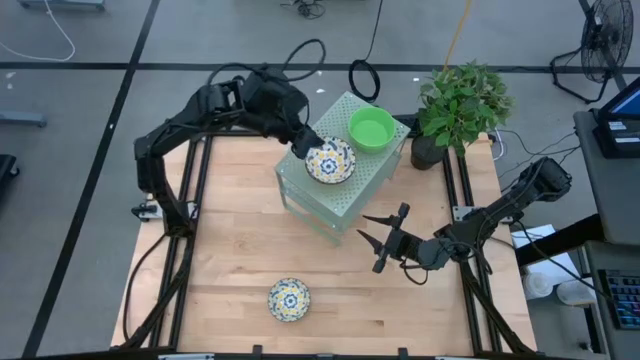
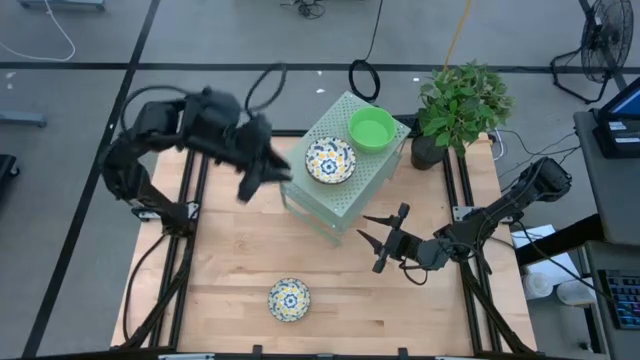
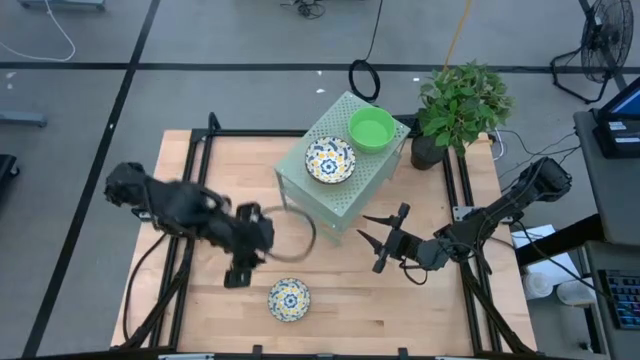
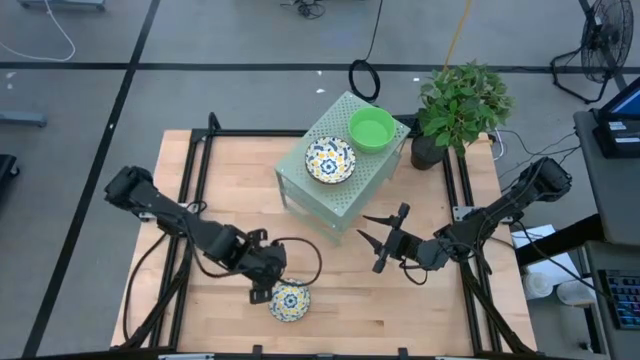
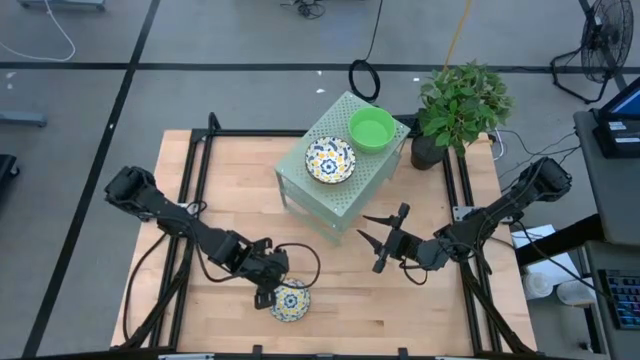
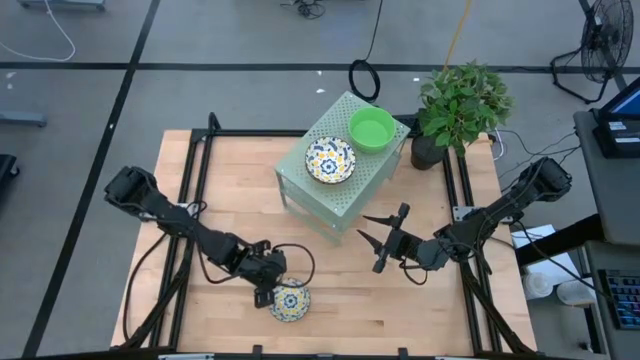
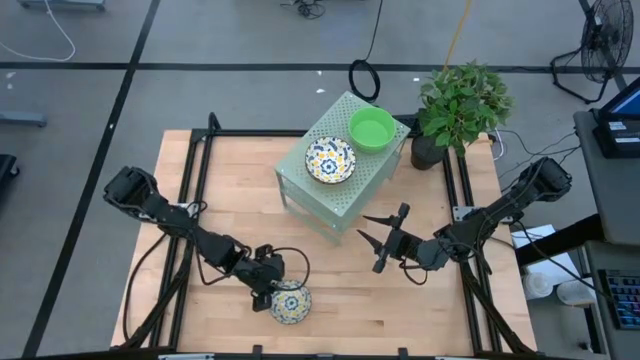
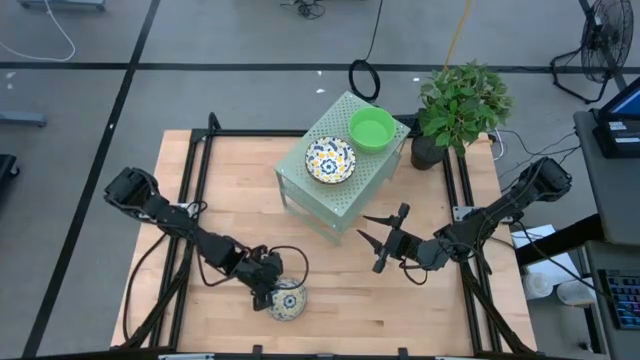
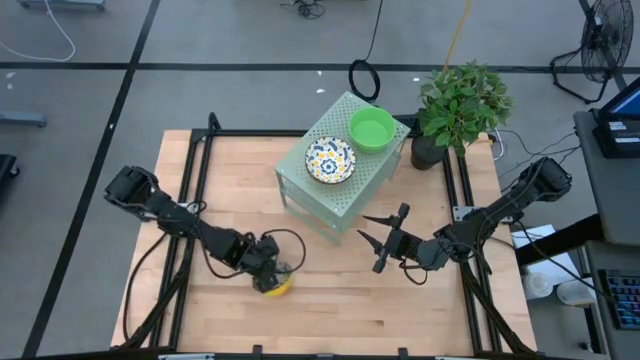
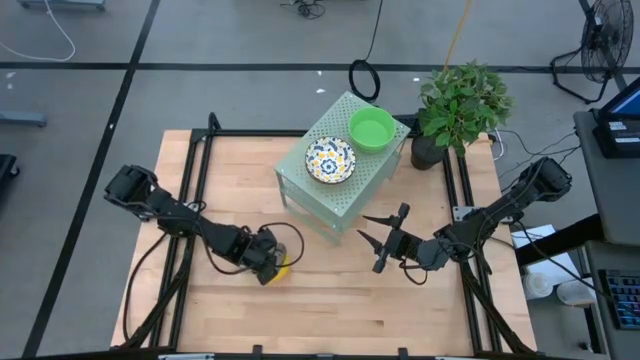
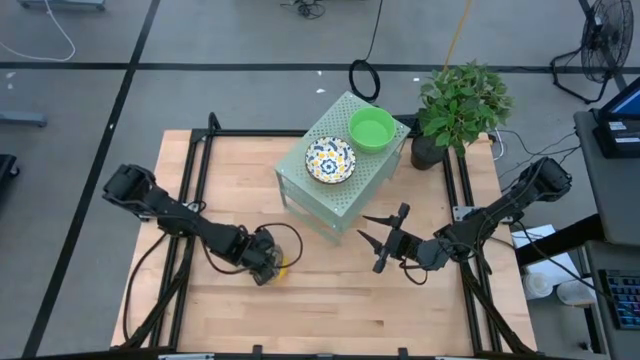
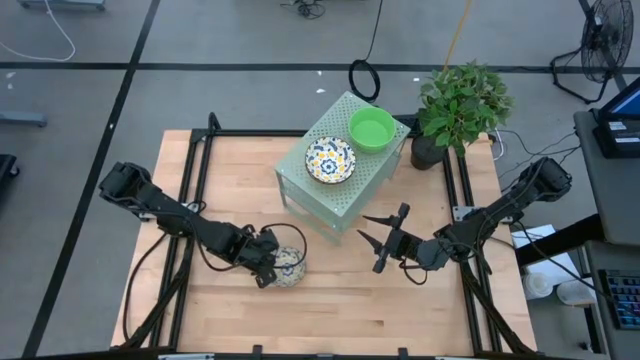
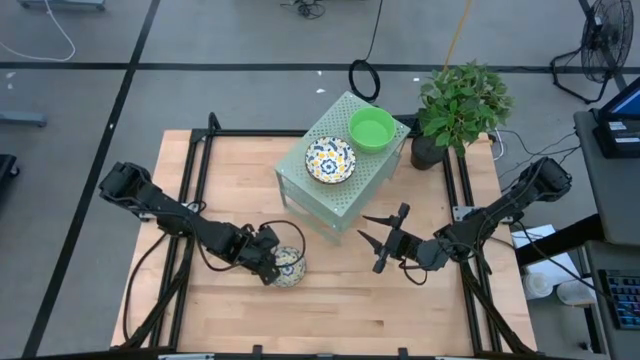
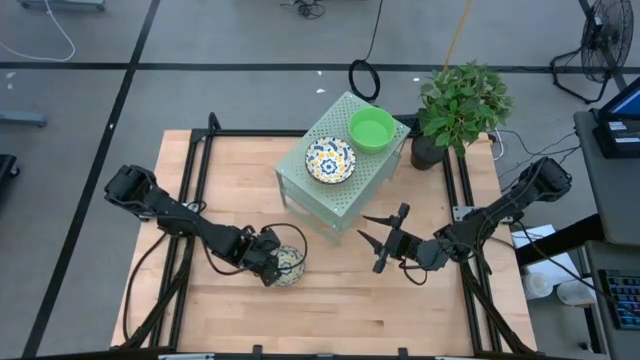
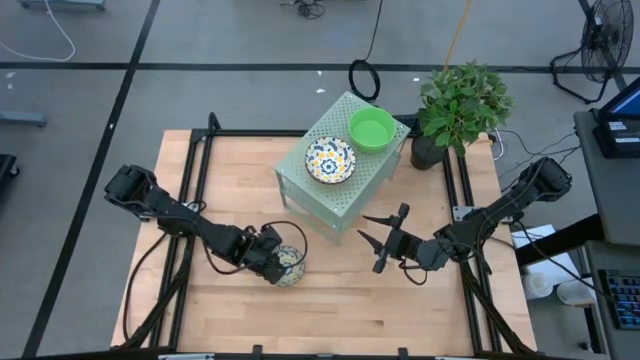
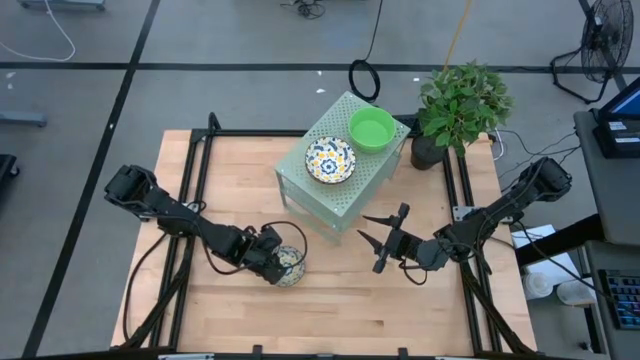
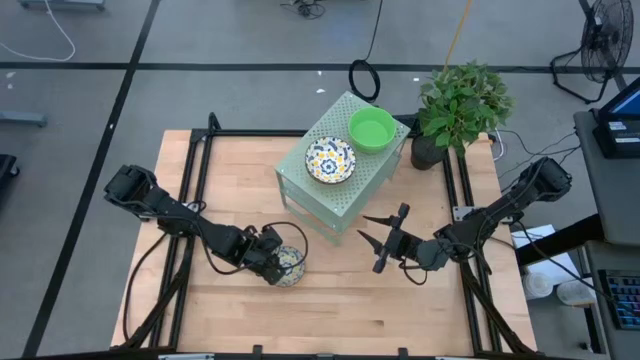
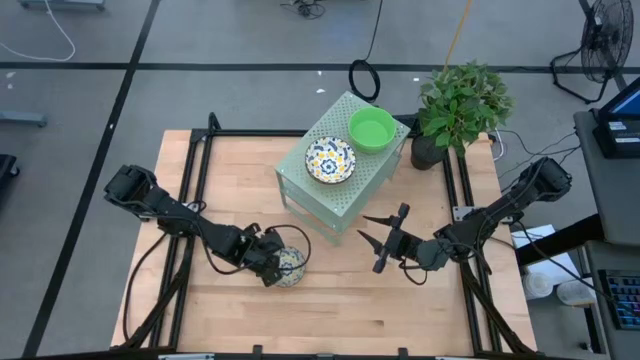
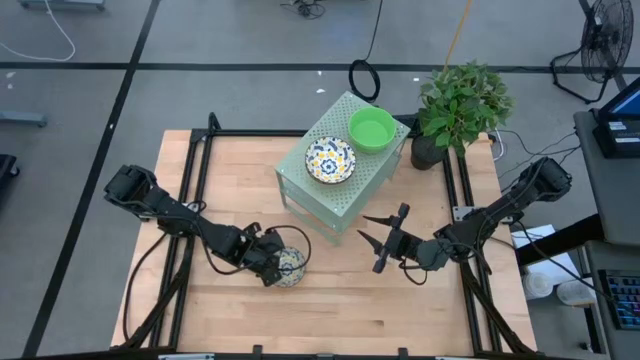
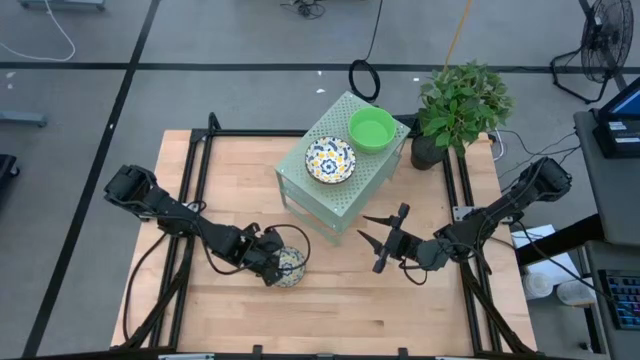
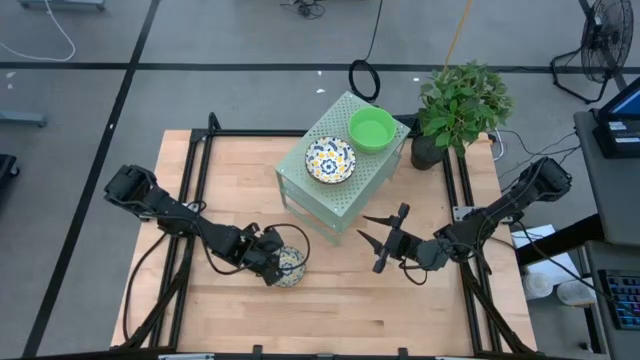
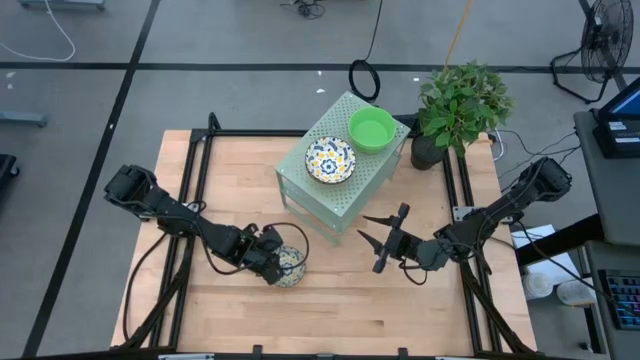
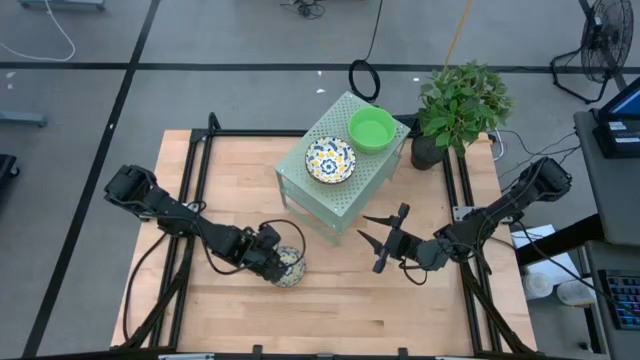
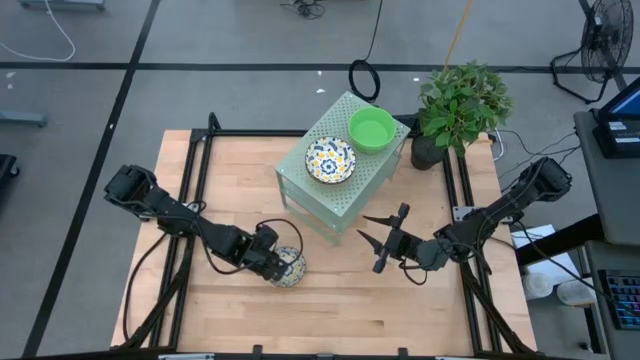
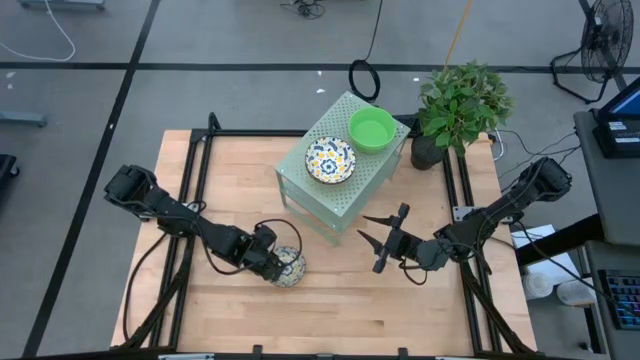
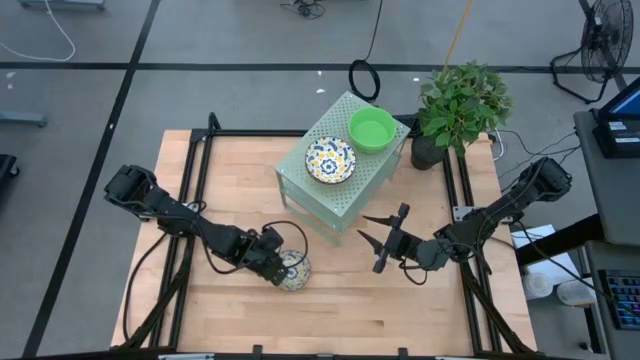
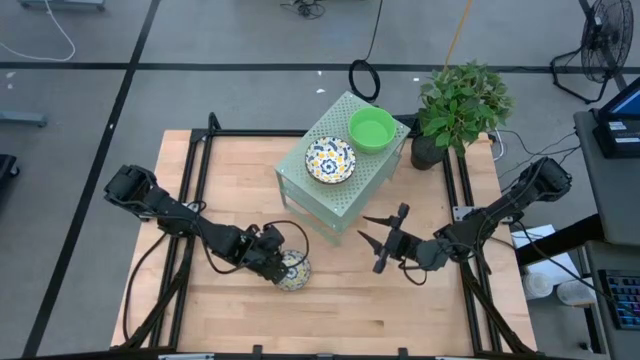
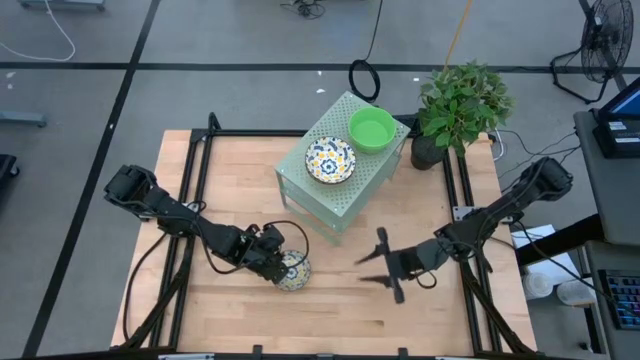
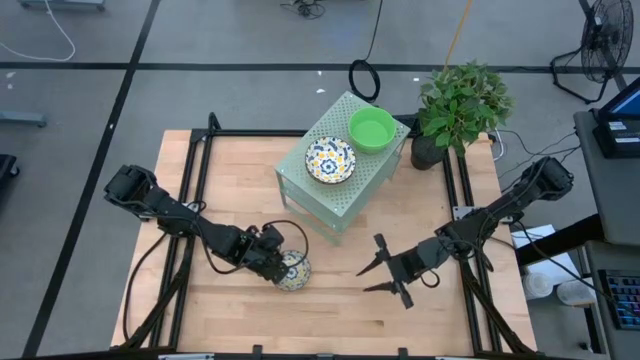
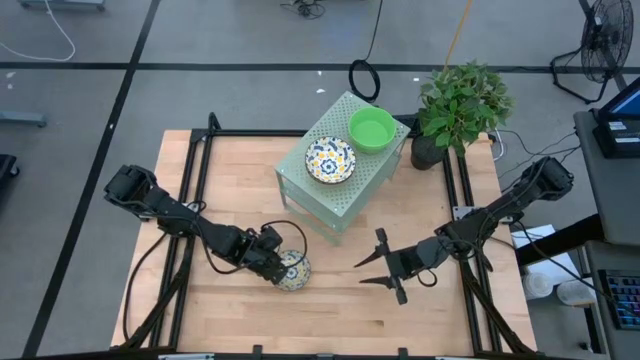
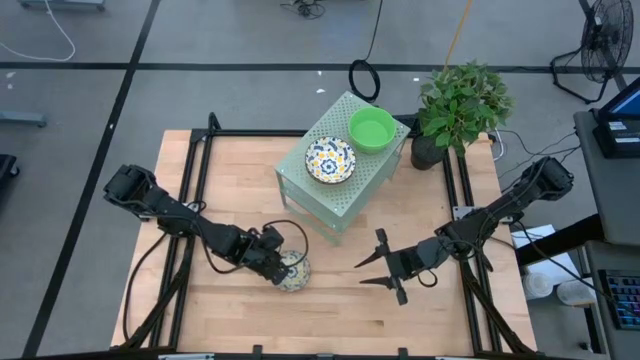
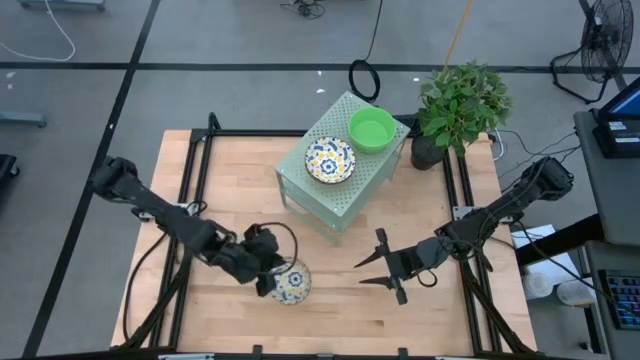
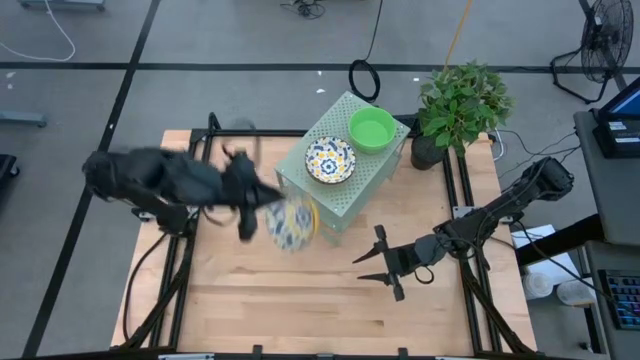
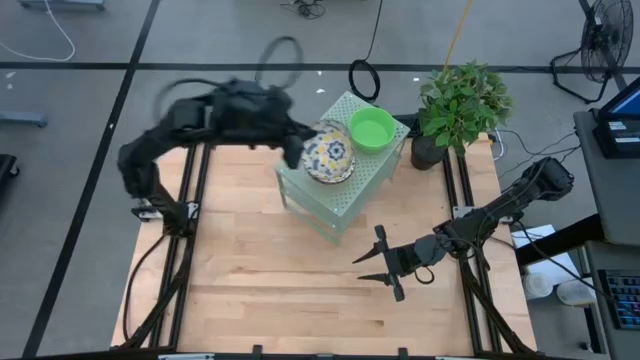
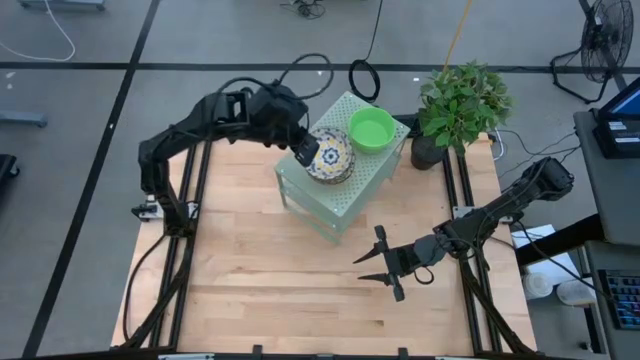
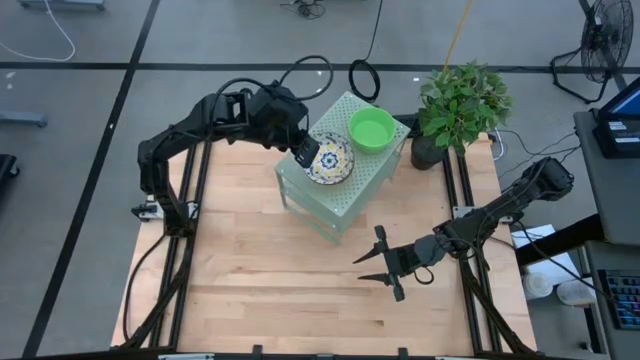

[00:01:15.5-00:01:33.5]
Task: Pick & Place Mini bowls
Stack the yellow patterned bowl on the yellow patterned bowls on the shelf
